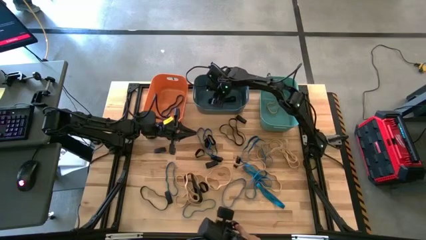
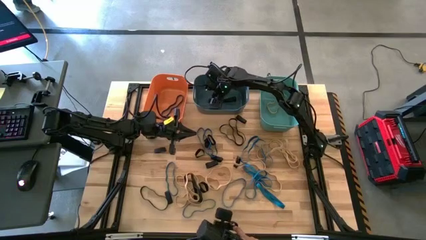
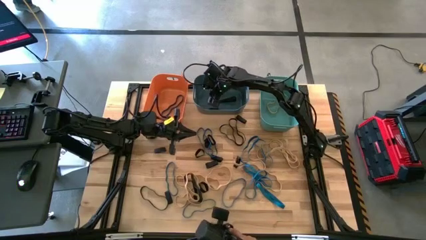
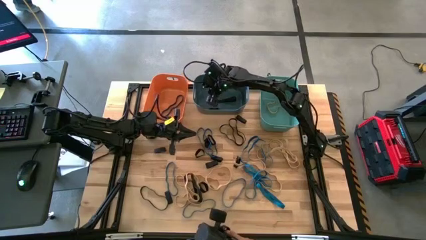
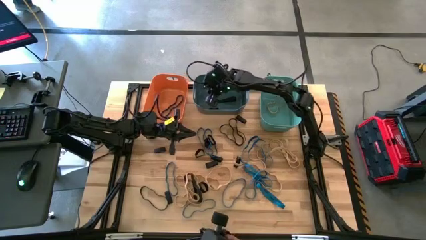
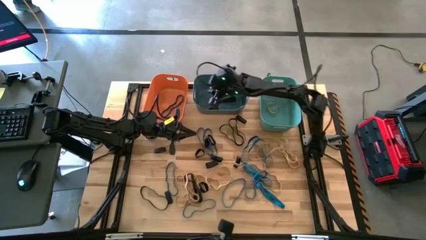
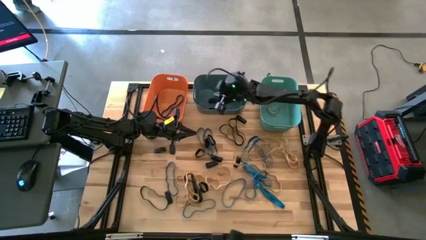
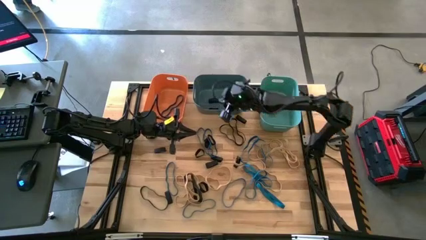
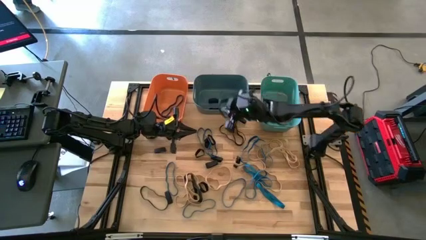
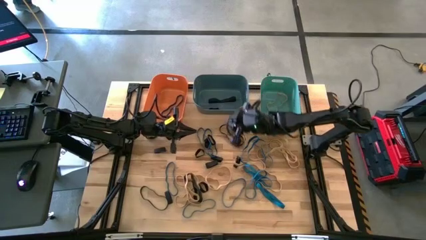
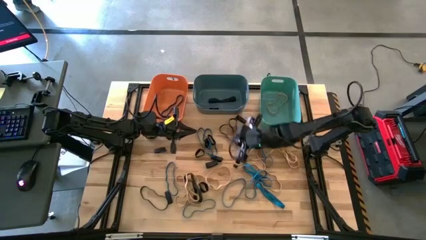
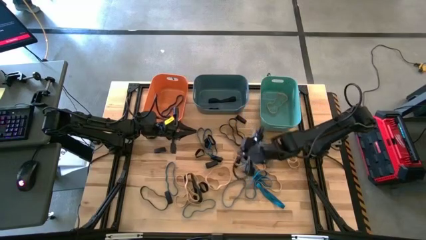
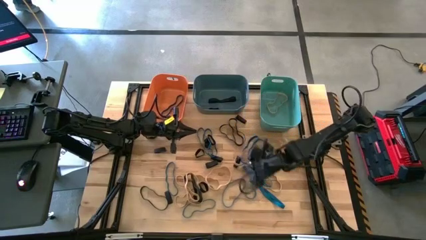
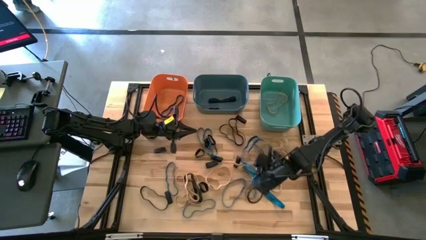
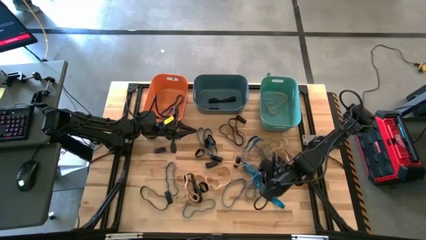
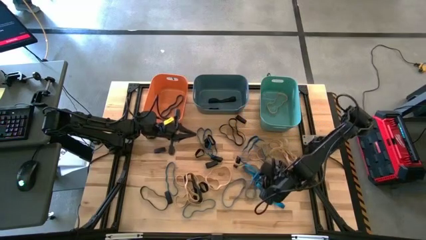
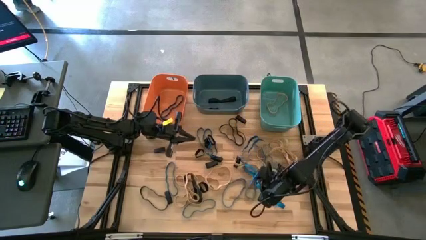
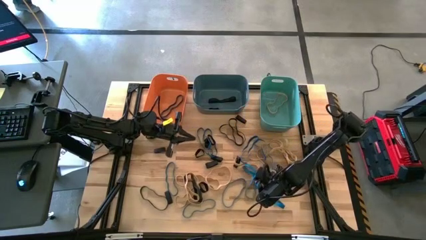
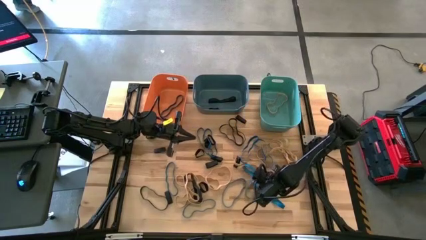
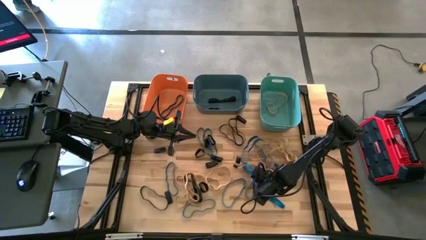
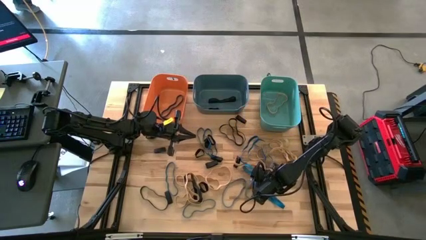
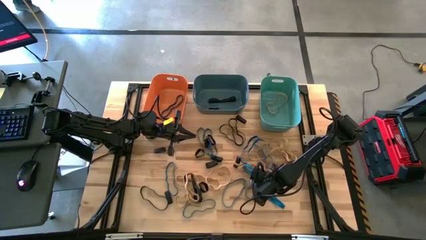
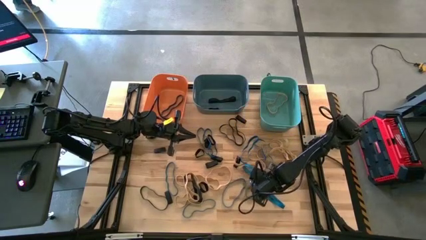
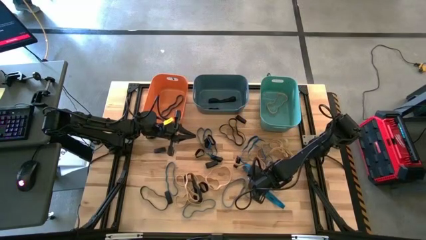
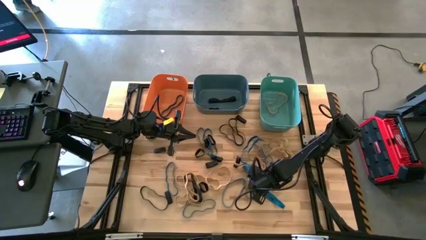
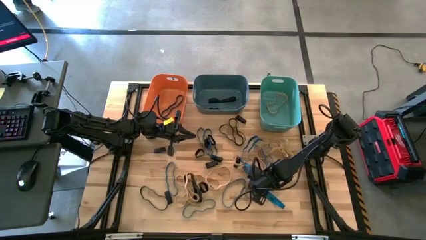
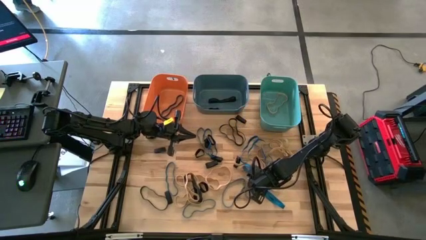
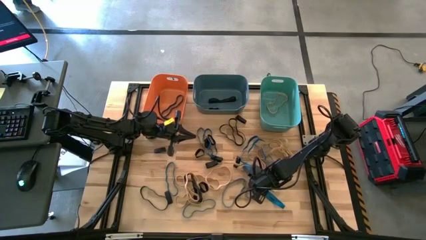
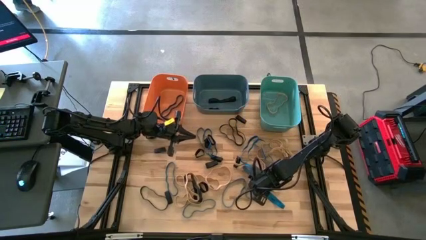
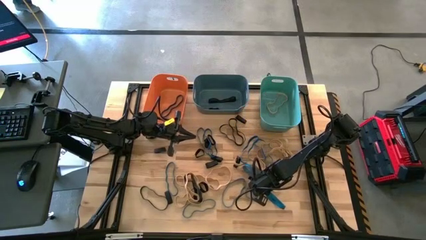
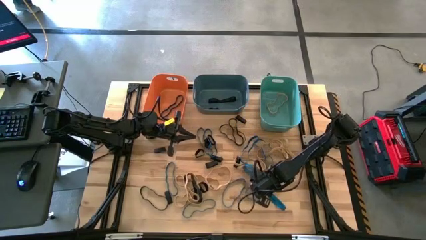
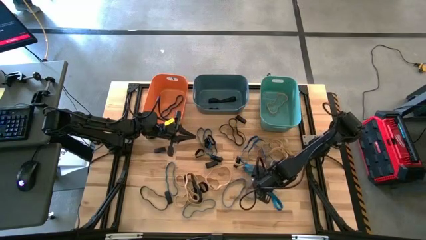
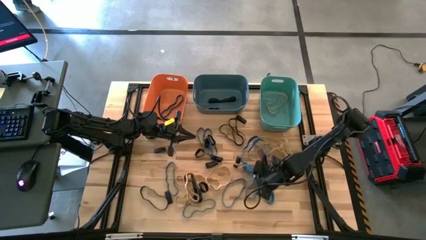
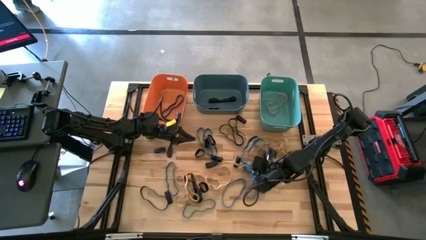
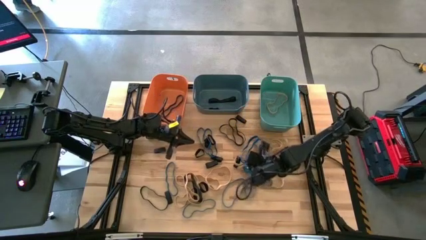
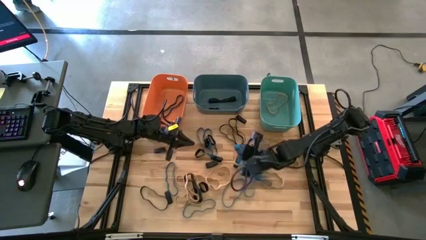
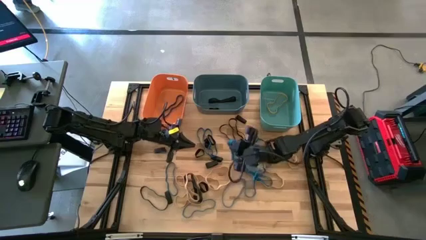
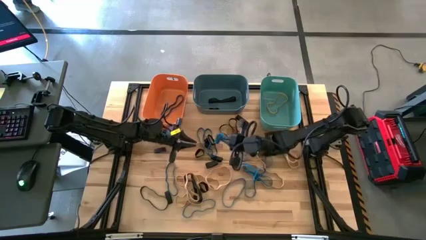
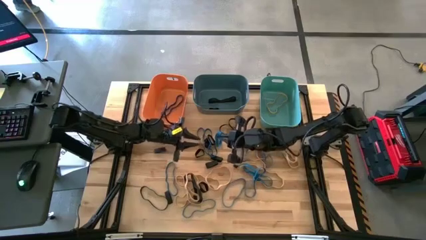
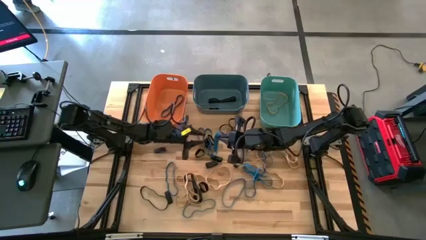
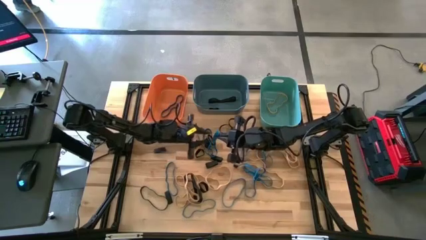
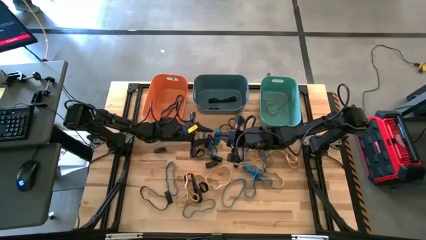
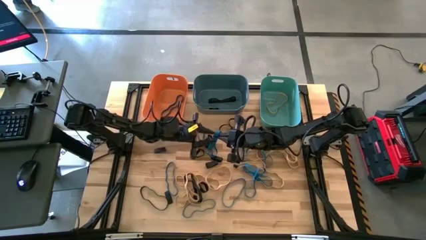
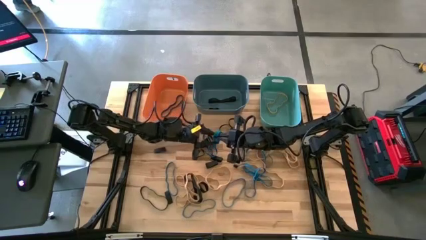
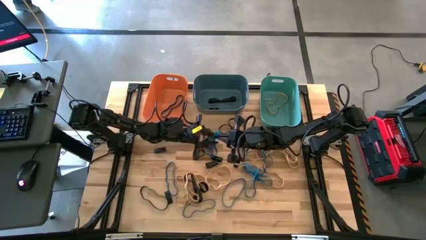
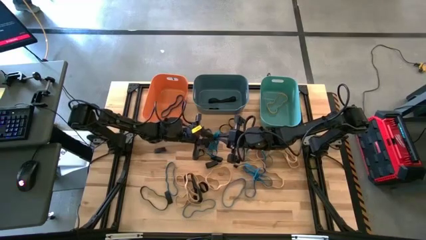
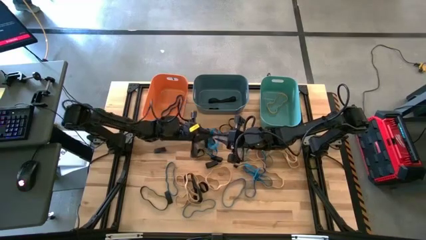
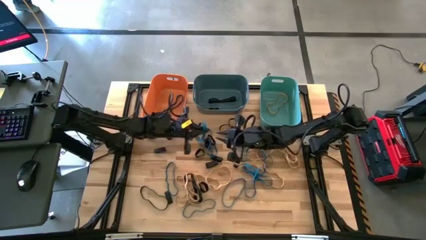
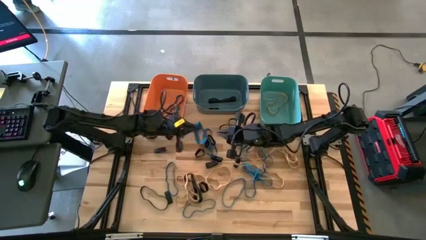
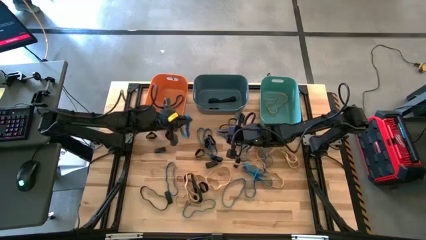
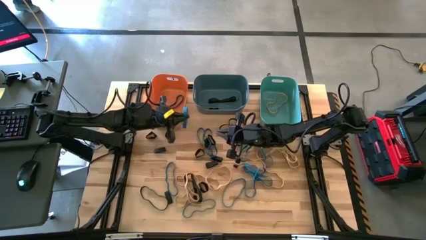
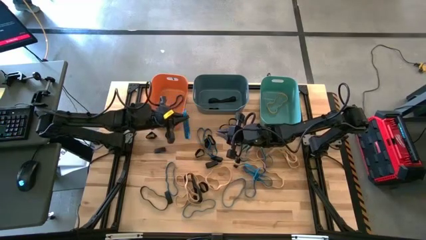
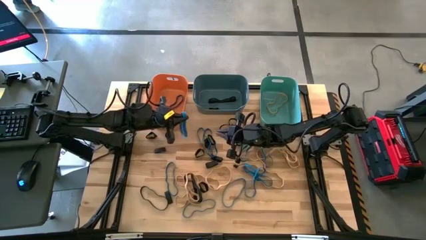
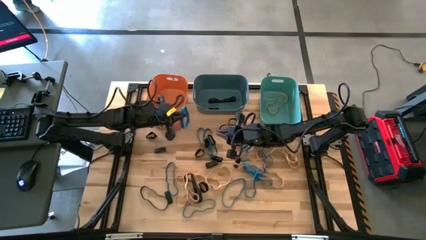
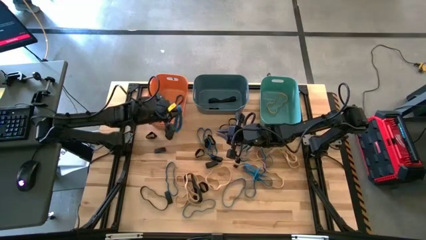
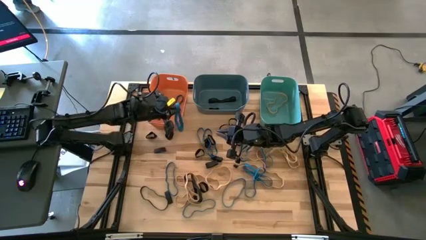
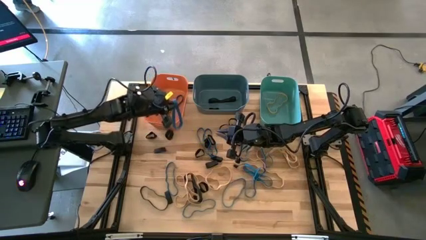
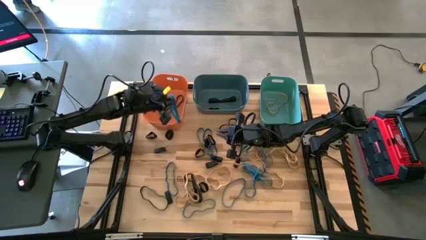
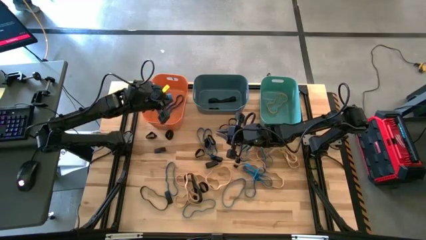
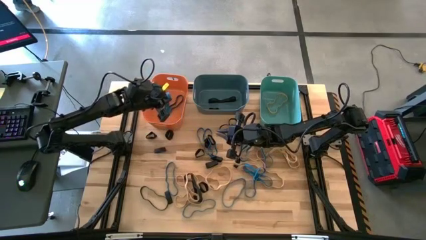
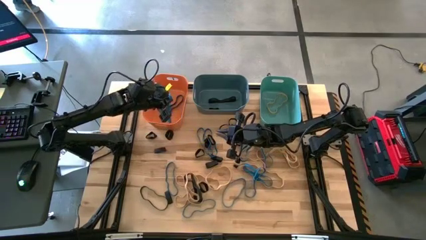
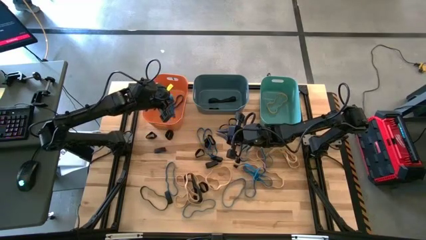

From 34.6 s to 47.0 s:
Task: Sort rubber bands into baskets
Put the blue rubber band into the orange bin

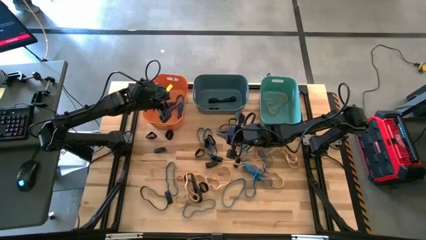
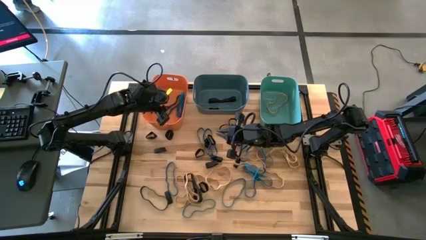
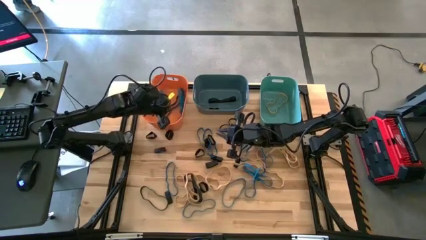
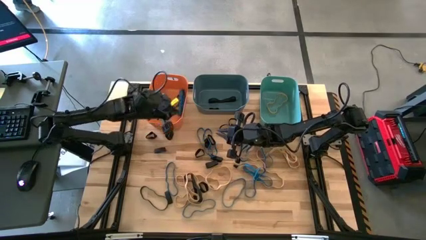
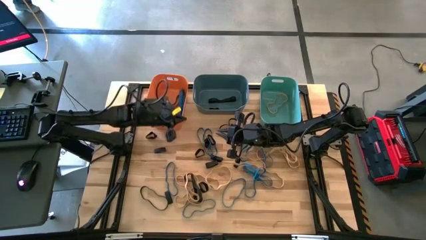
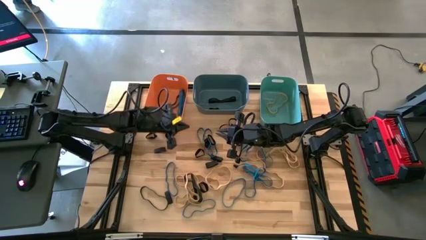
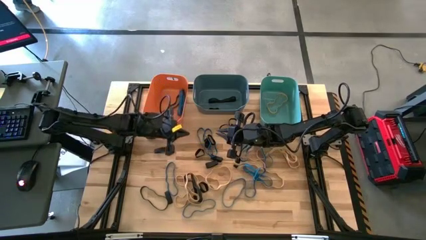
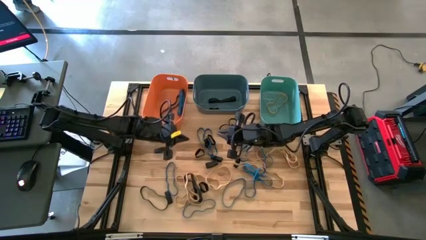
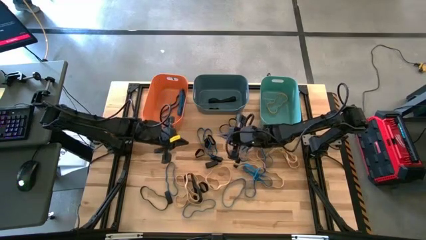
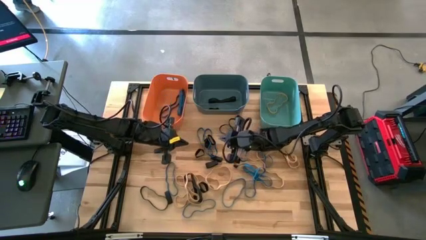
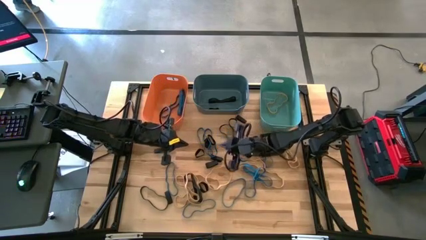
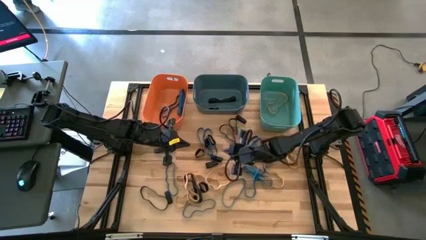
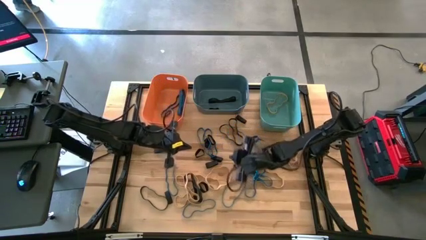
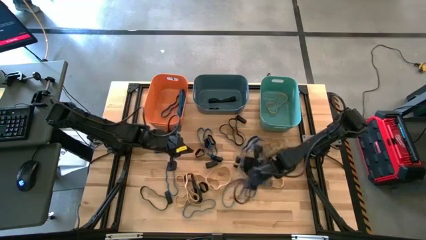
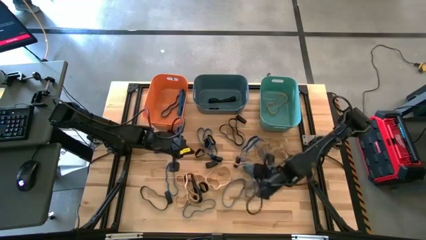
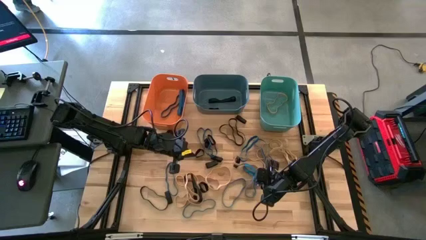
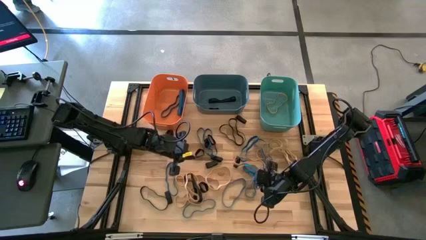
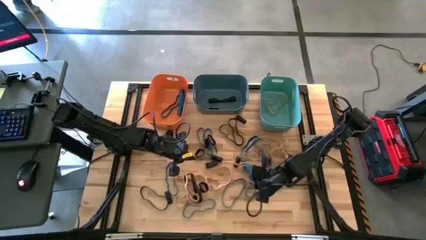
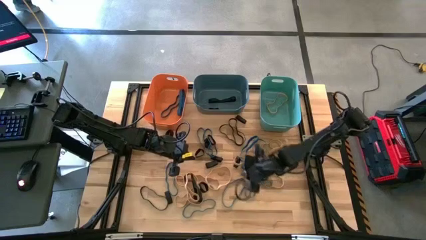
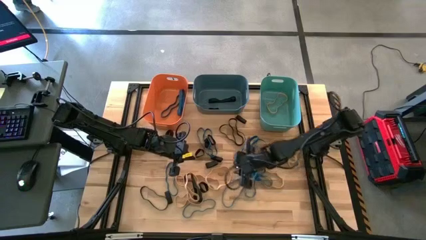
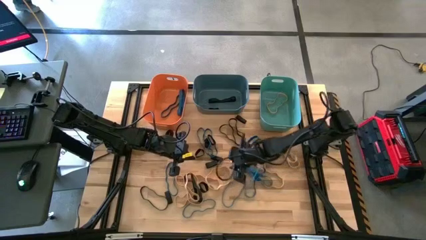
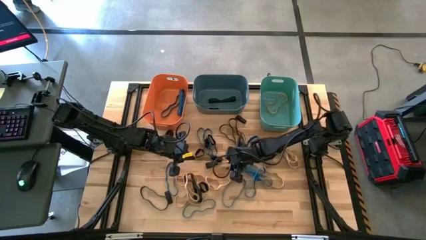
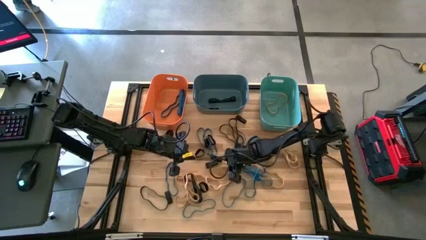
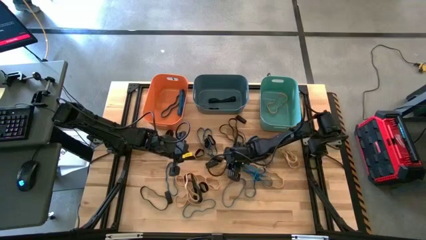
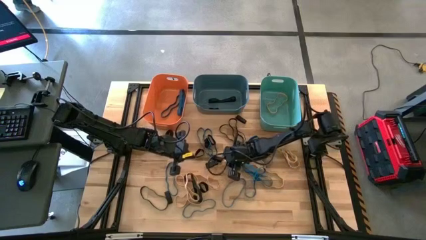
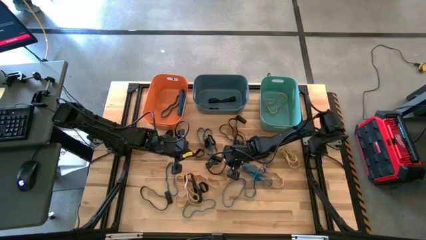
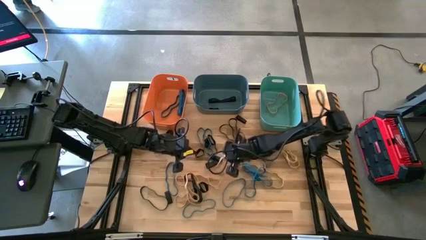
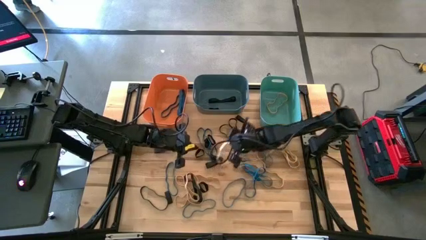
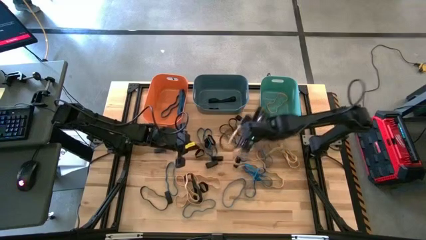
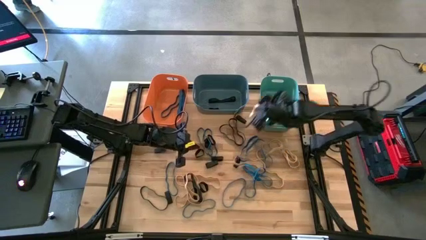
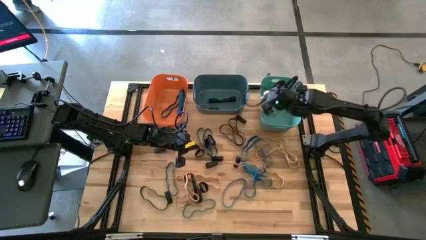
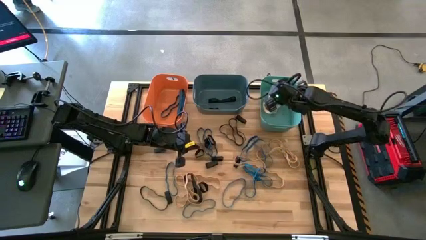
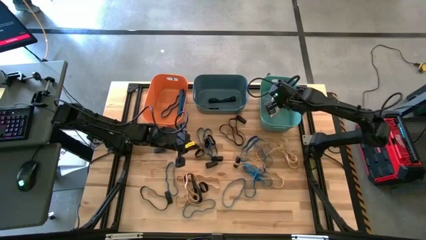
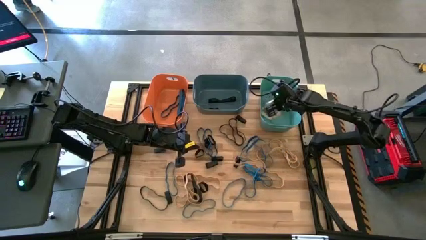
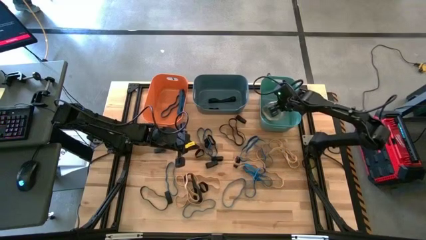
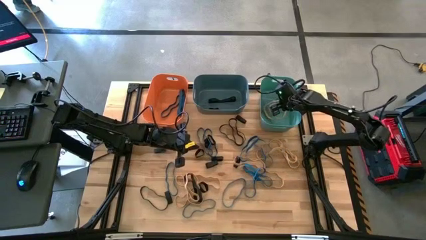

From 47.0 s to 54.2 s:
Put the brown rubber band into the green bin
